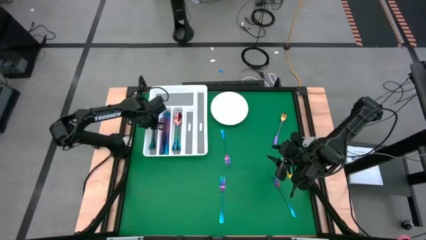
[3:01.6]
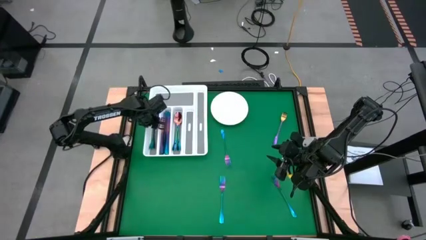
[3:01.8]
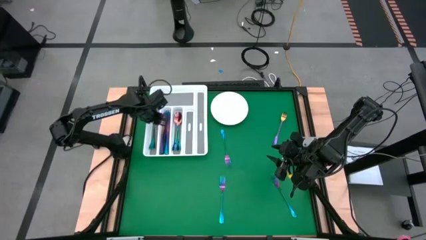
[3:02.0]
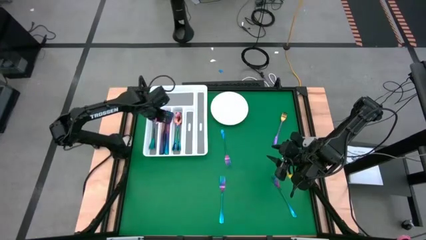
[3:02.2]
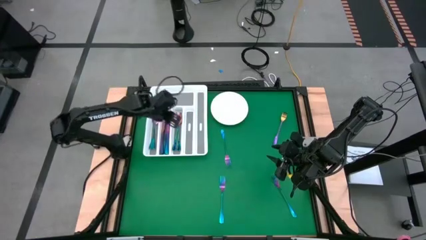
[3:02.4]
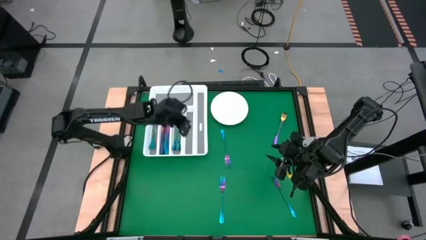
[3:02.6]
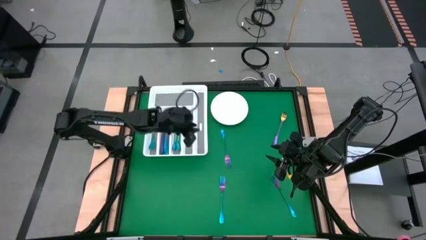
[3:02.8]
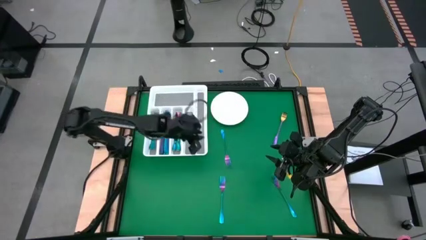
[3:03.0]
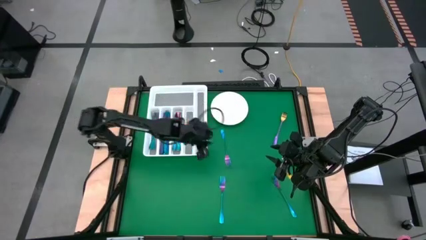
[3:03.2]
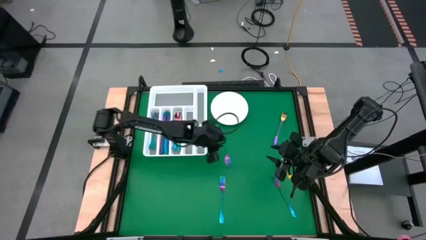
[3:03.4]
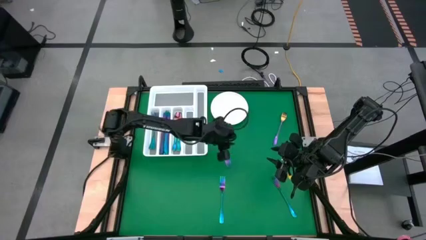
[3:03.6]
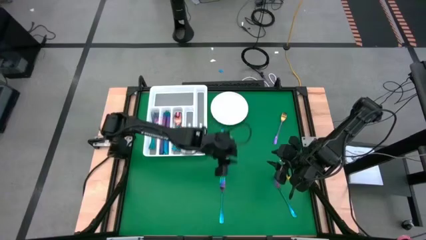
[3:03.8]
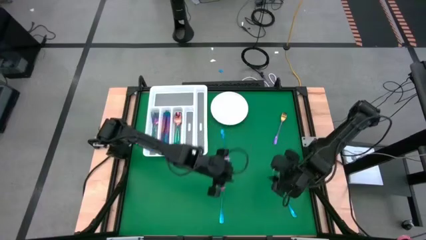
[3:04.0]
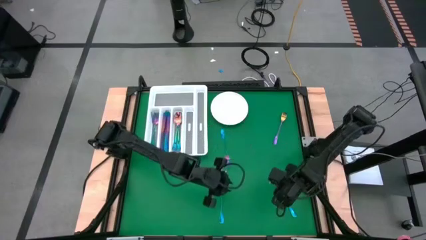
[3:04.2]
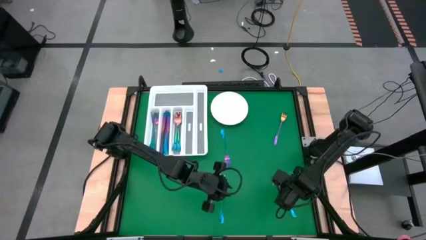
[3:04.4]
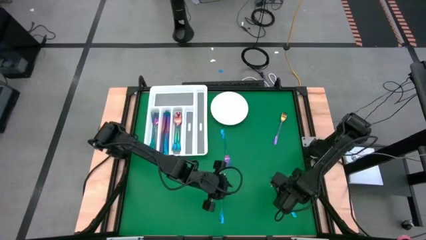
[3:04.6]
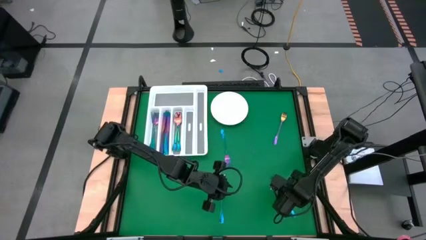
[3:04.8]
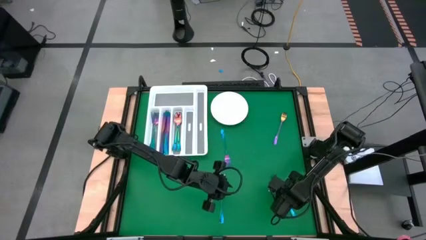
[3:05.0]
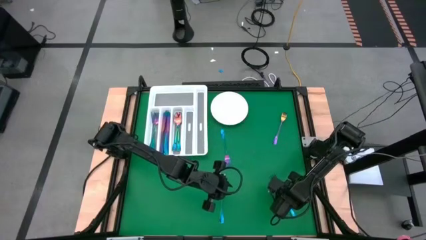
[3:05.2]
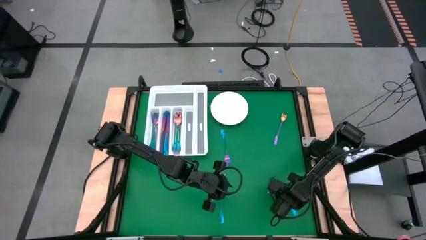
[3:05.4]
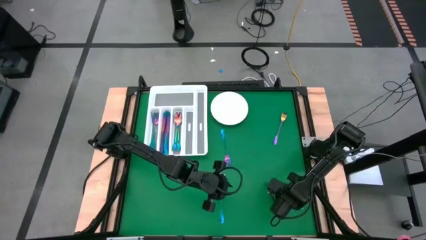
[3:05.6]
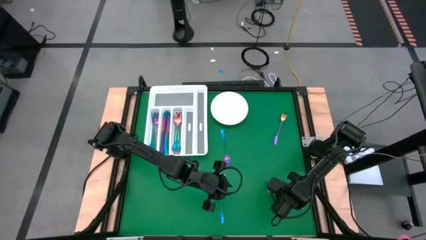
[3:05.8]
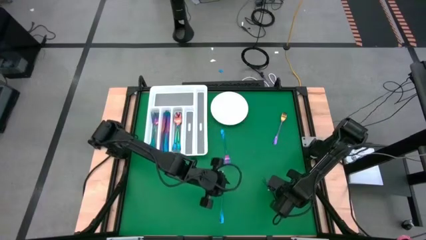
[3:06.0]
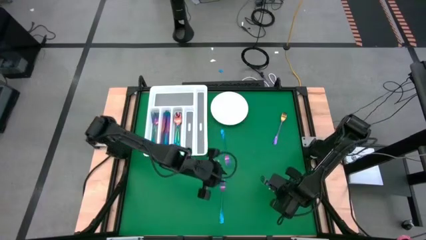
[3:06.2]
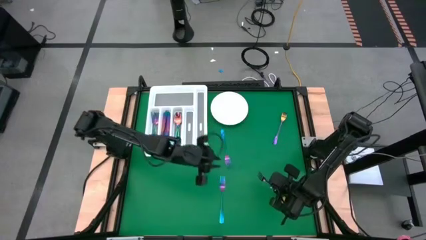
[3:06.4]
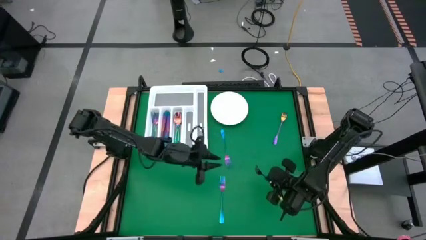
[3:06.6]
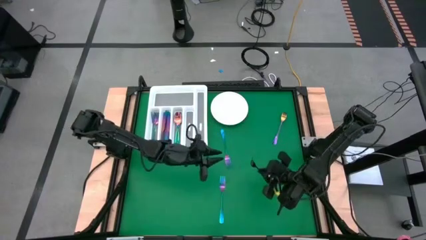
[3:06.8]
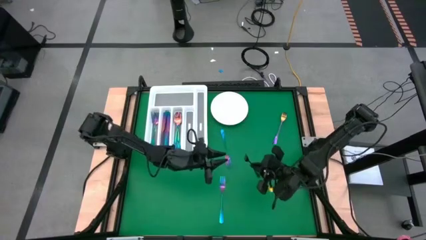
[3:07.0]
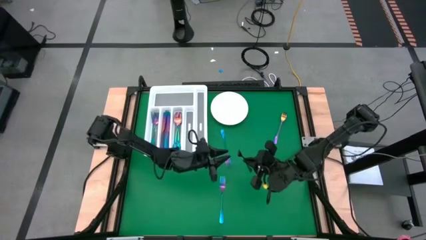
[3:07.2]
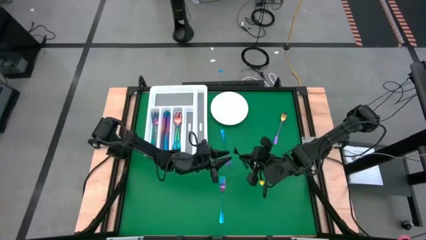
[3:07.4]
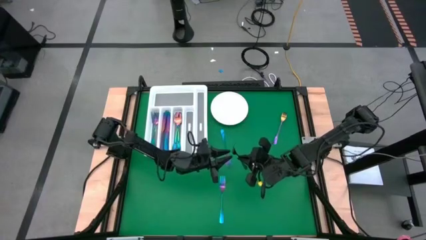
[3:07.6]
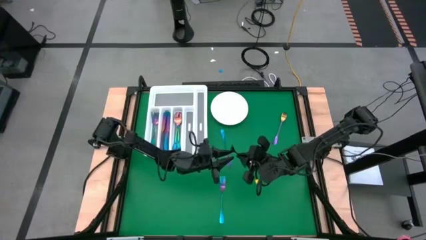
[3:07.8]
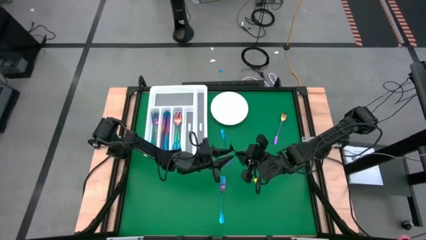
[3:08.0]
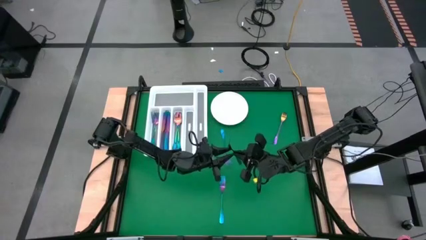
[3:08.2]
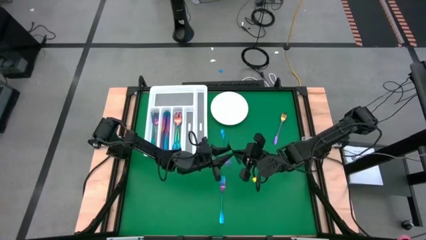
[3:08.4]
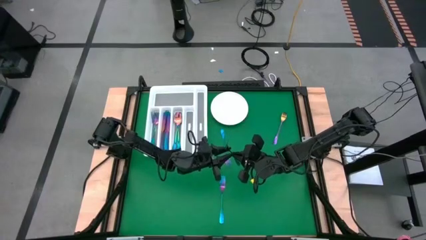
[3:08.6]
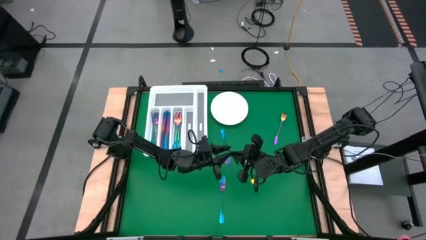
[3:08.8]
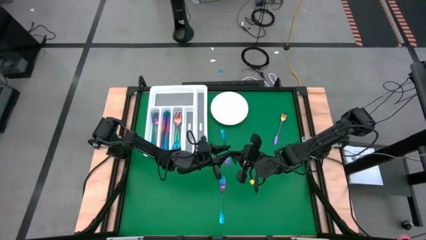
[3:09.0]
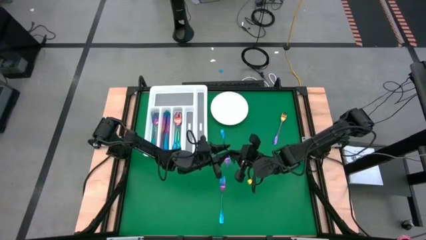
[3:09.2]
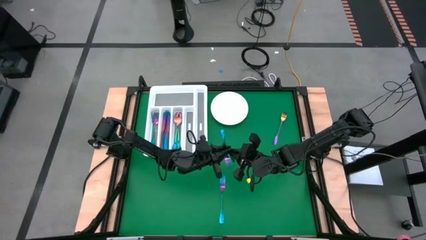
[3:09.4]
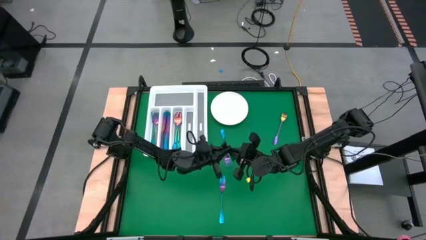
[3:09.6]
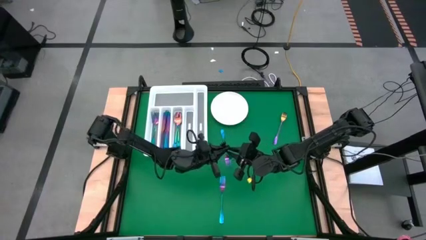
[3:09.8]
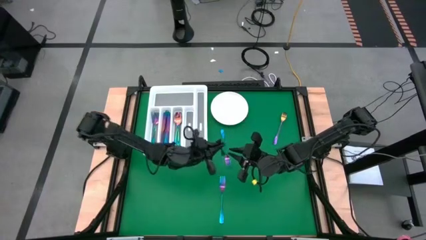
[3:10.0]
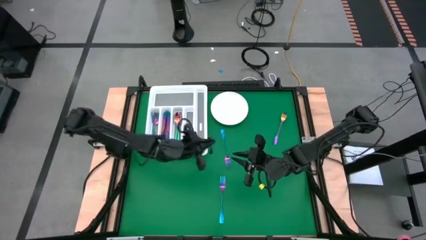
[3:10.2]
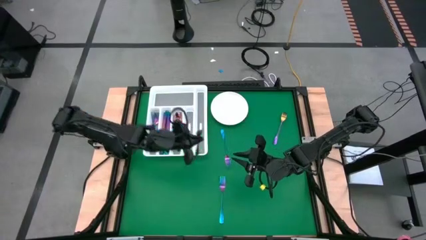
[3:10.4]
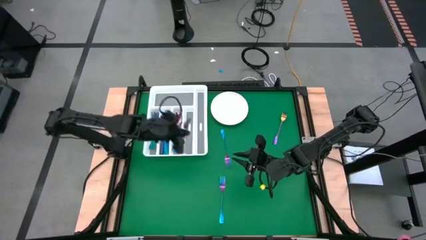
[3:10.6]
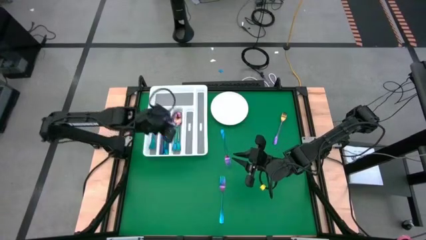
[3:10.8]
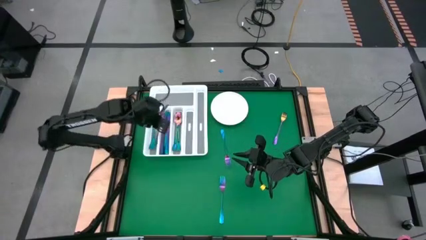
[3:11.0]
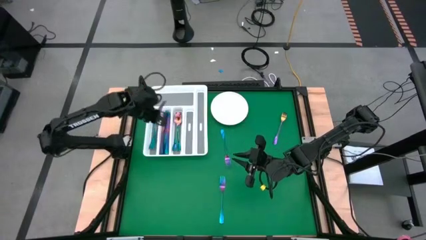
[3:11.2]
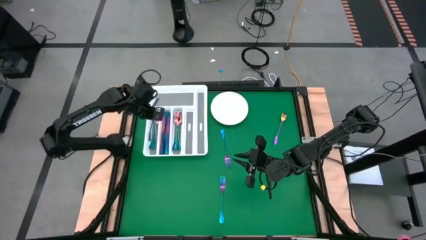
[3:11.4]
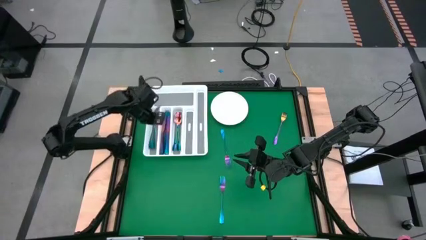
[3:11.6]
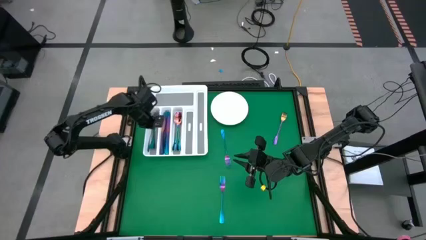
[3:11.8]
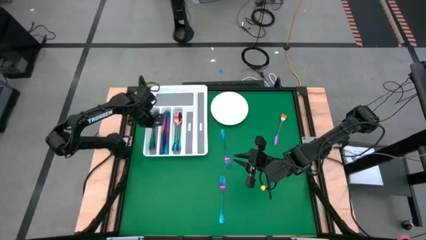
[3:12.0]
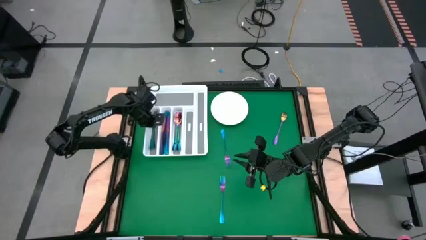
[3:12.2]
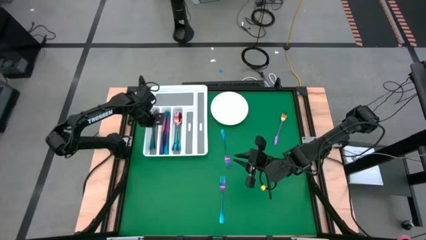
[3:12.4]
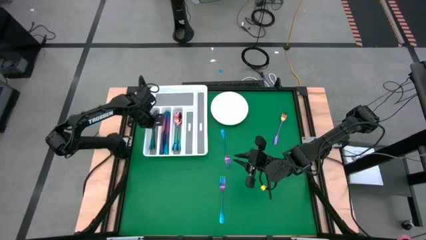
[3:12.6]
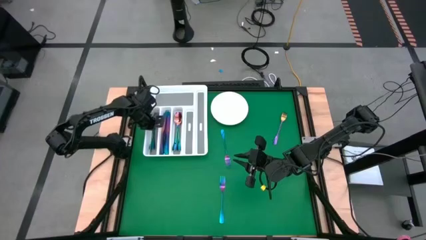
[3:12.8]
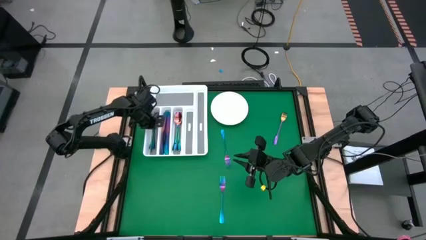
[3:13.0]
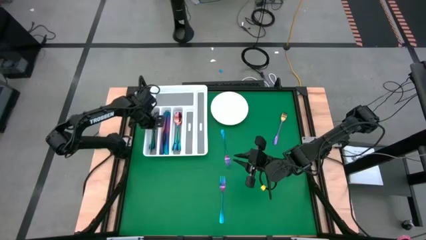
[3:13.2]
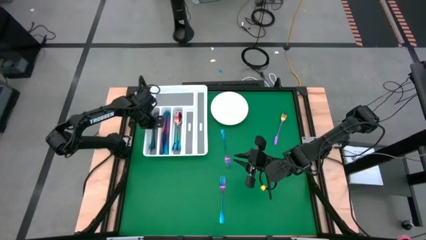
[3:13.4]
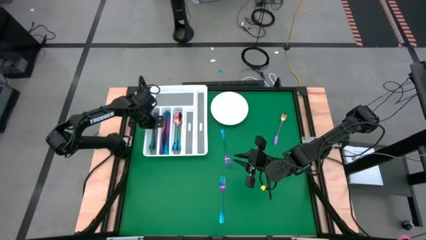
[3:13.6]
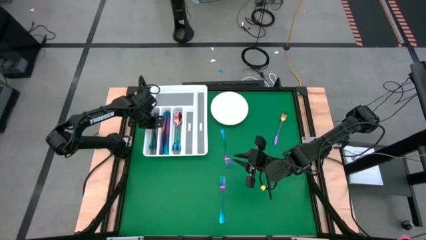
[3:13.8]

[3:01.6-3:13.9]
Task: Sort silverware
Put the blue fork into the silverware tray

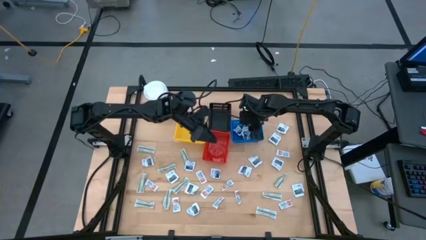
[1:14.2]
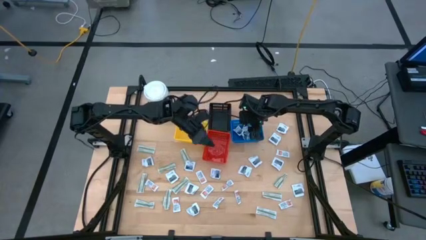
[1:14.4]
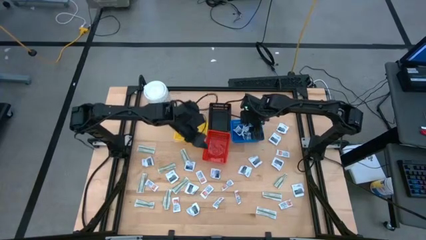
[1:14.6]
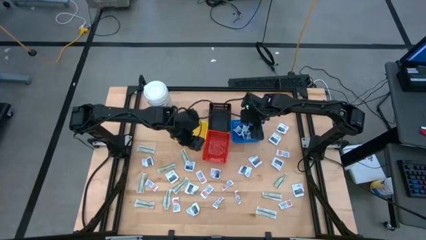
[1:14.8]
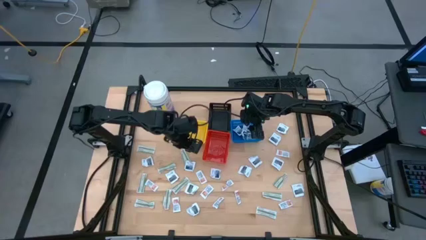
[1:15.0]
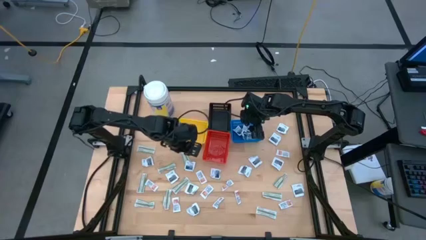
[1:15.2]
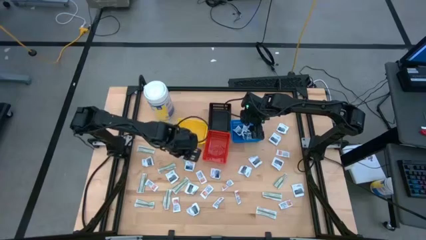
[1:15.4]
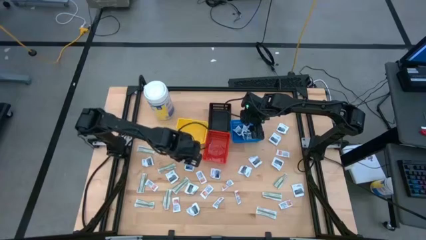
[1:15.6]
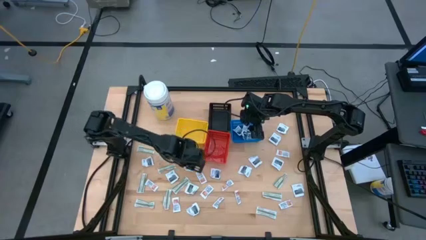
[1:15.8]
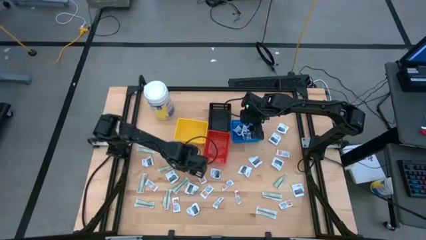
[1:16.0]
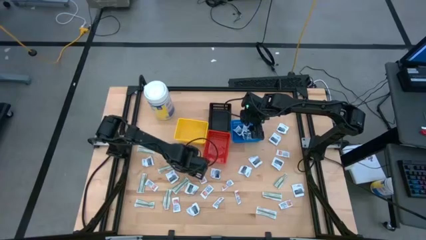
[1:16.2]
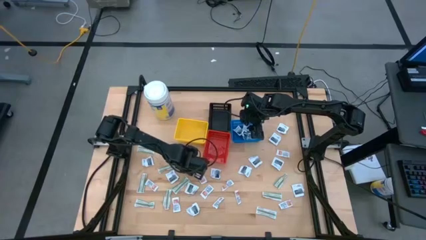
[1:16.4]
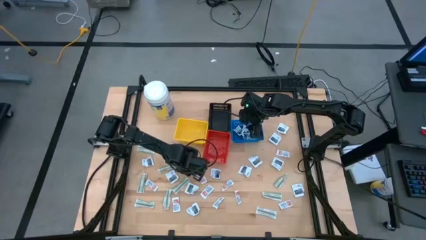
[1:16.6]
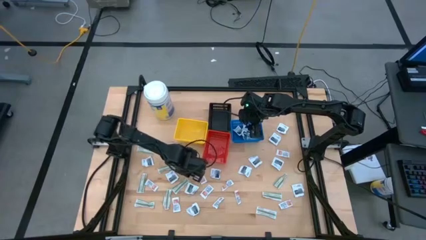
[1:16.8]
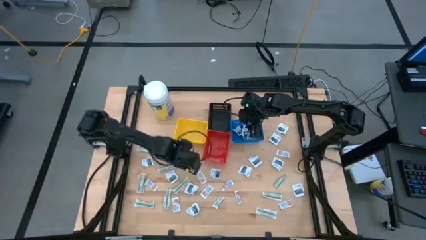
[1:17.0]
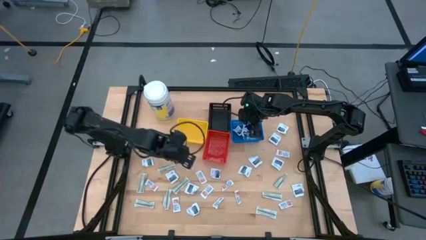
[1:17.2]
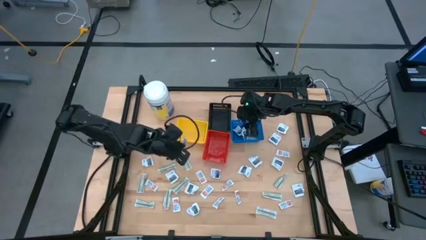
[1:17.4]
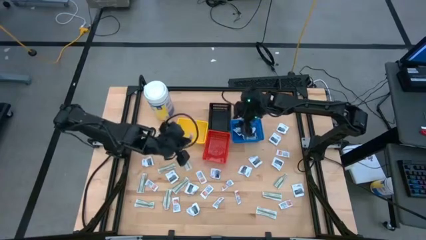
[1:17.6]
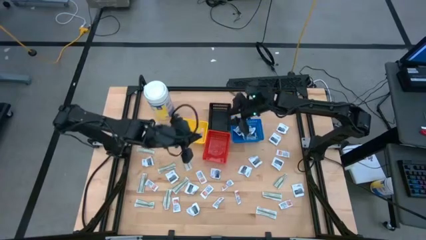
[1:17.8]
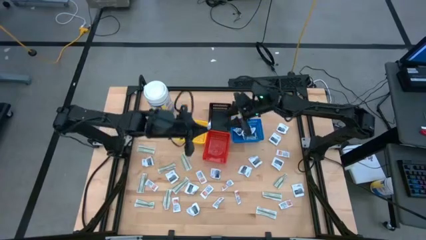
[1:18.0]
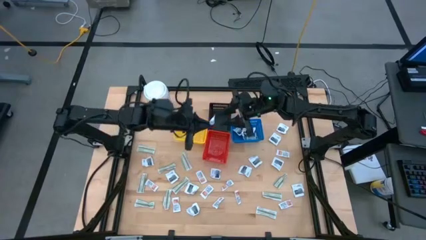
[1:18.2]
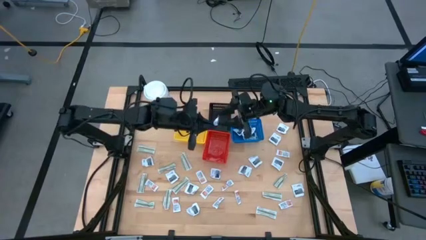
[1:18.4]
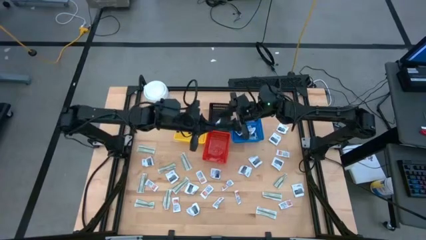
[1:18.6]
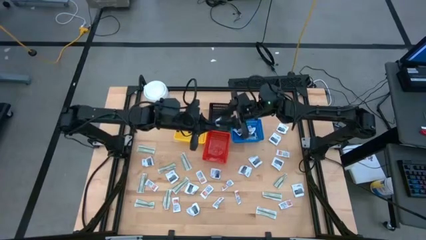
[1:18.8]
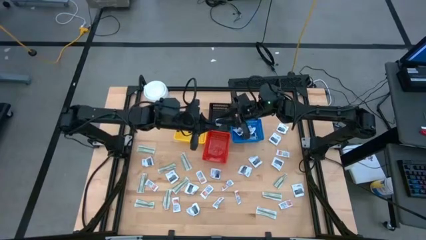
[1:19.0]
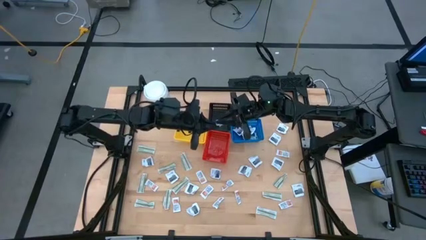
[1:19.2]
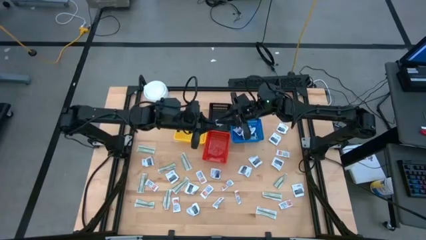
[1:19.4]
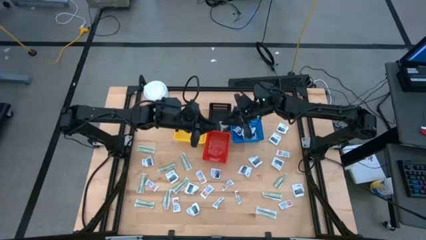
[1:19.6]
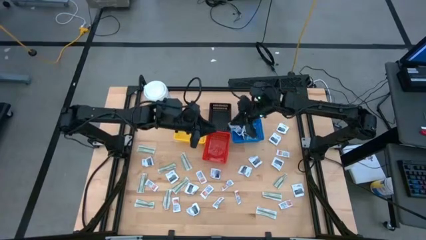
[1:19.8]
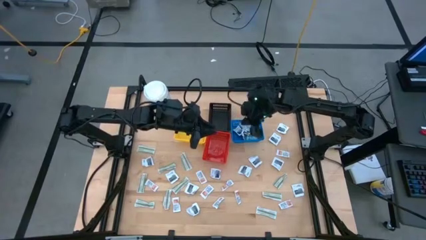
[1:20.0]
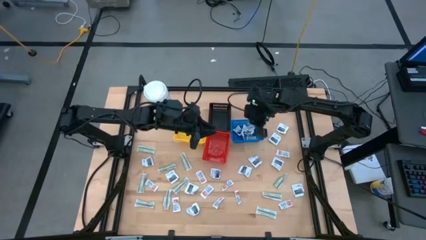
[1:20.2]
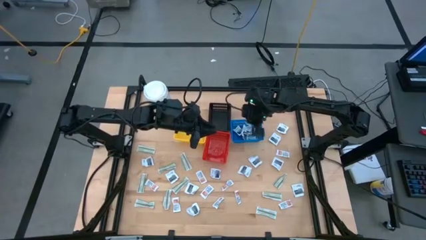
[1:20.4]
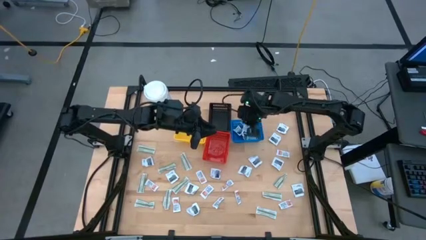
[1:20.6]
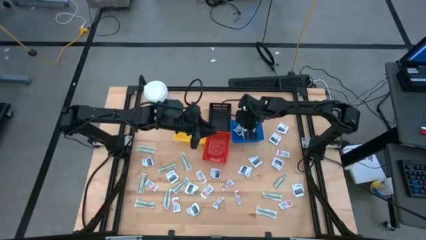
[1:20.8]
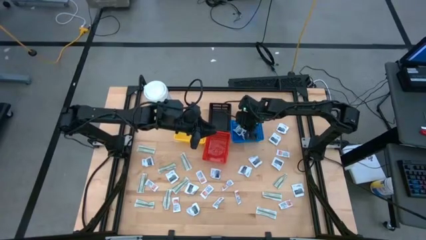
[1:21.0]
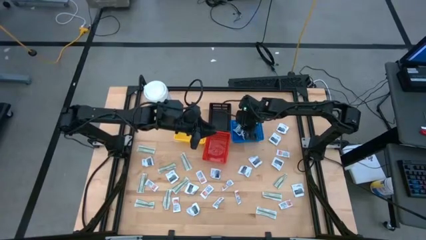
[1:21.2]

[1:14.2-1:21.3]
Task: Pick & Place First Aid Supplies
Put the alcohol pad into the blue bin
